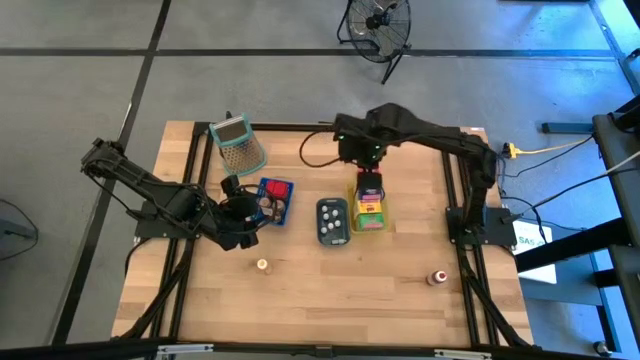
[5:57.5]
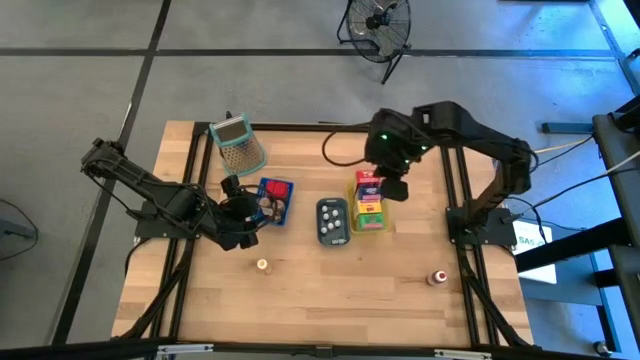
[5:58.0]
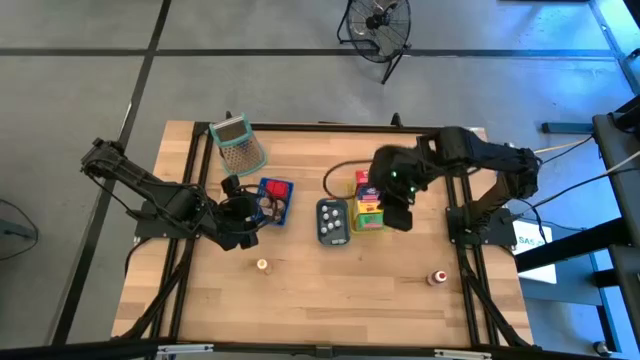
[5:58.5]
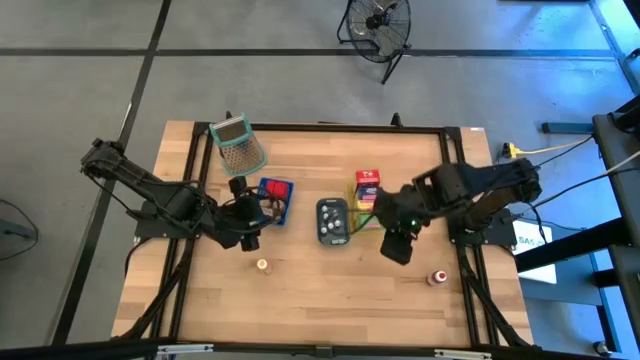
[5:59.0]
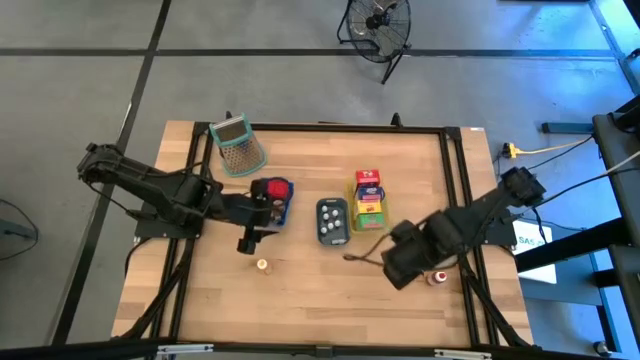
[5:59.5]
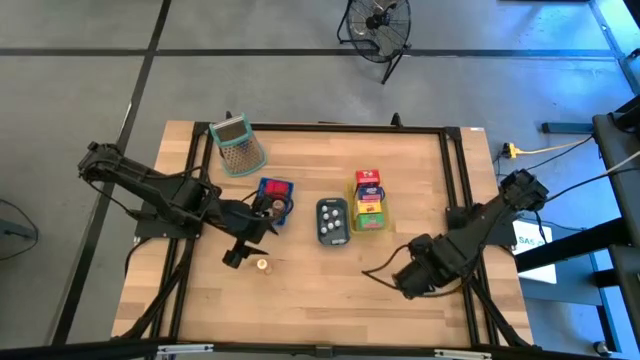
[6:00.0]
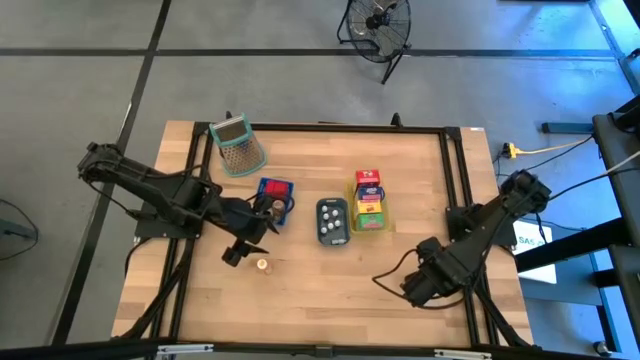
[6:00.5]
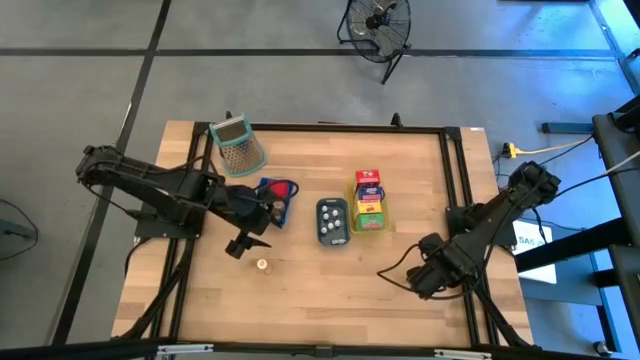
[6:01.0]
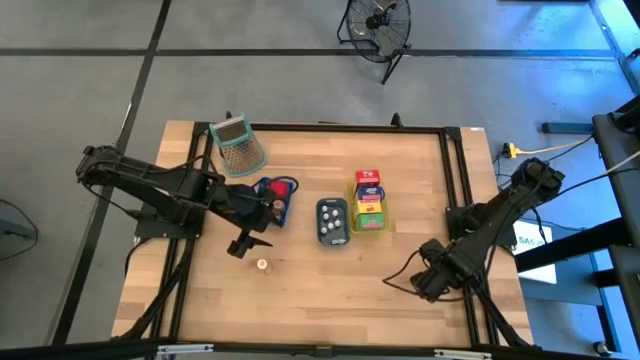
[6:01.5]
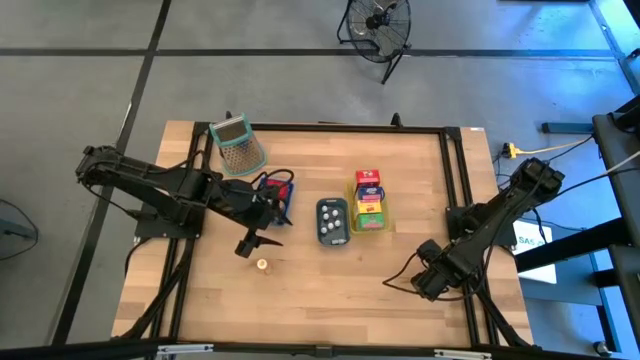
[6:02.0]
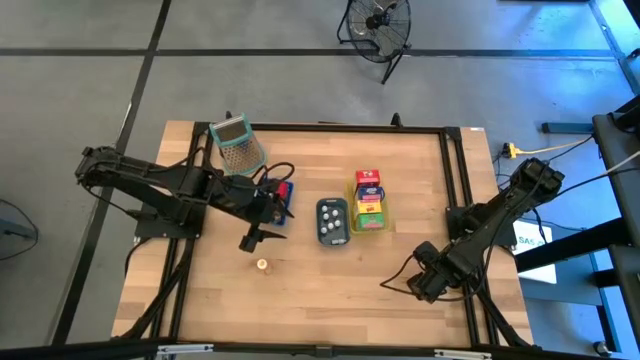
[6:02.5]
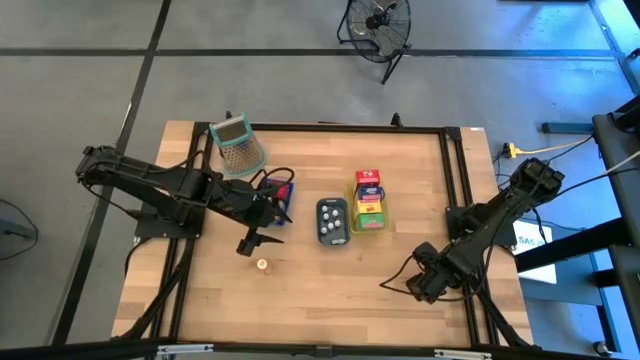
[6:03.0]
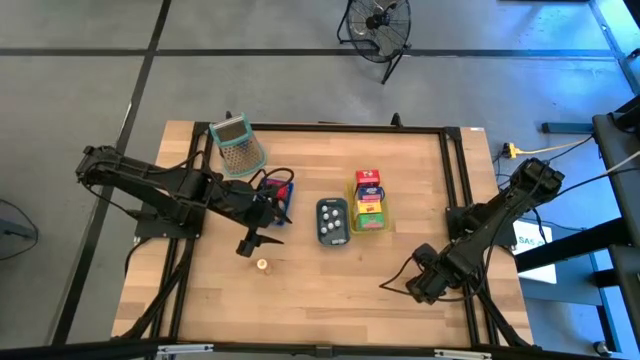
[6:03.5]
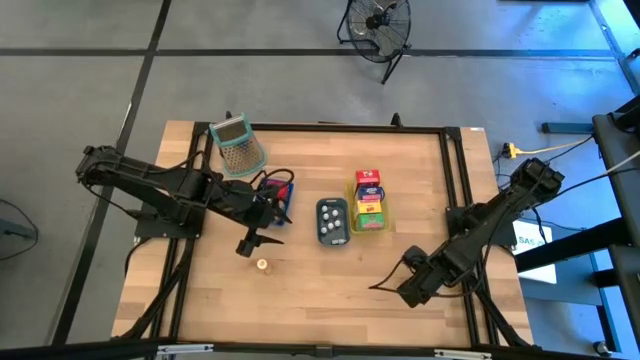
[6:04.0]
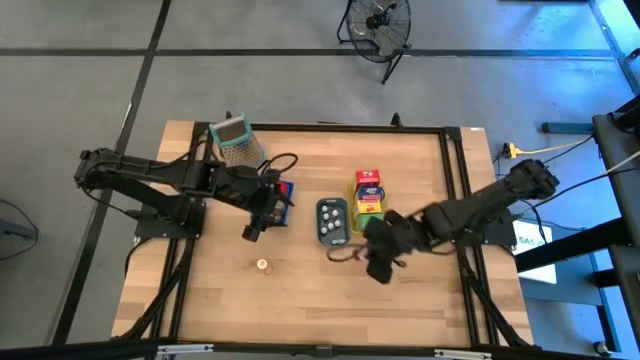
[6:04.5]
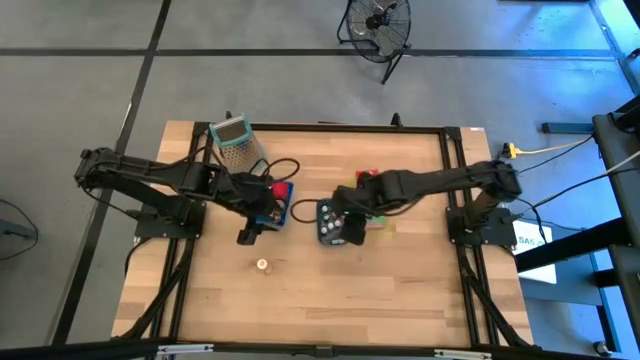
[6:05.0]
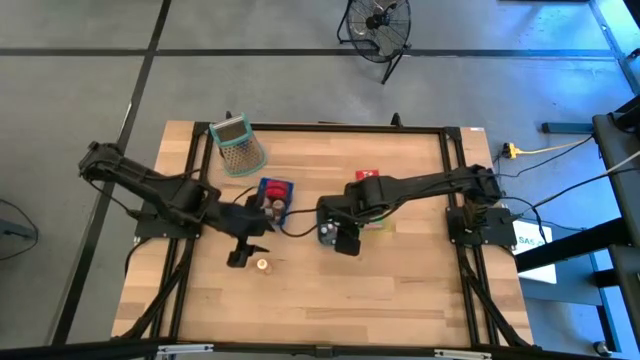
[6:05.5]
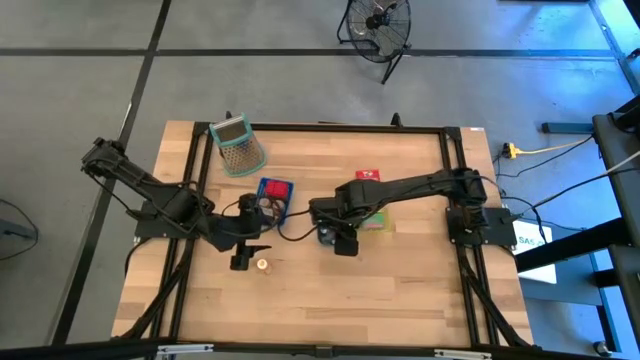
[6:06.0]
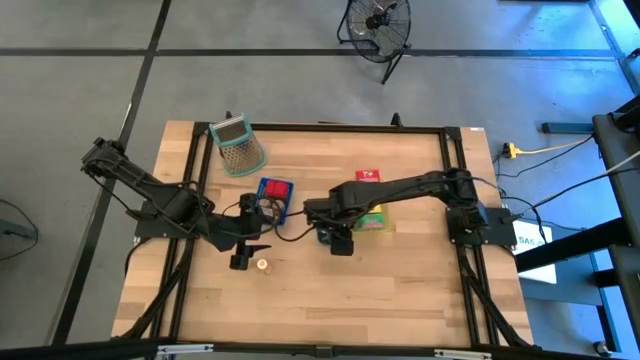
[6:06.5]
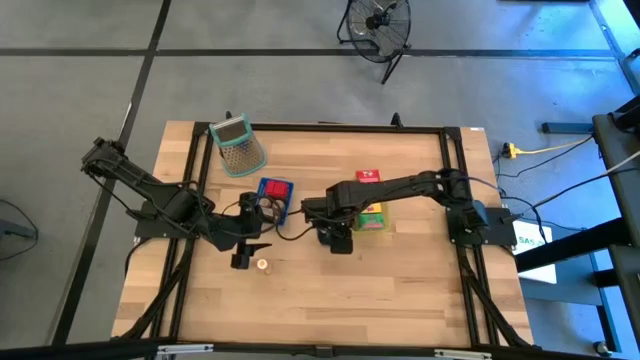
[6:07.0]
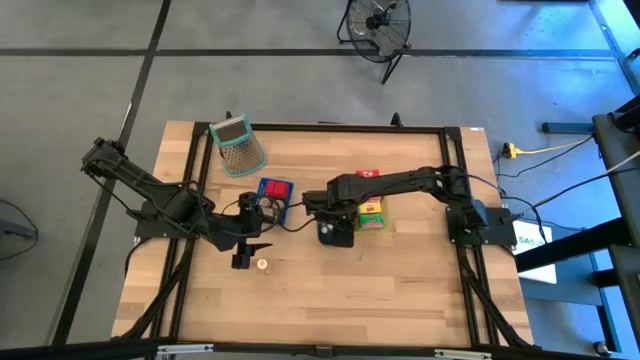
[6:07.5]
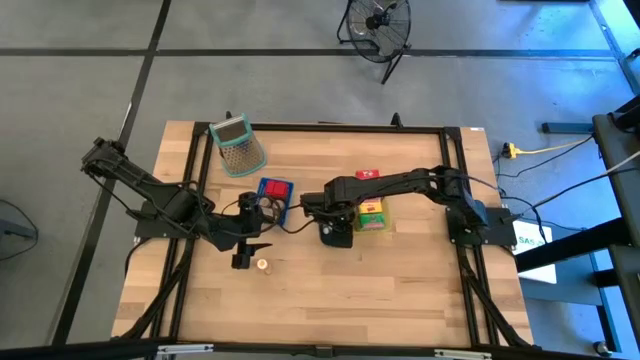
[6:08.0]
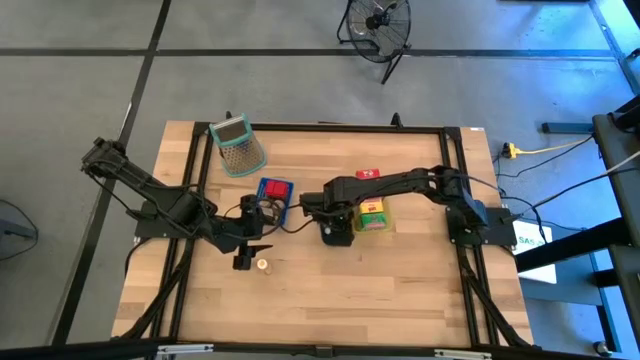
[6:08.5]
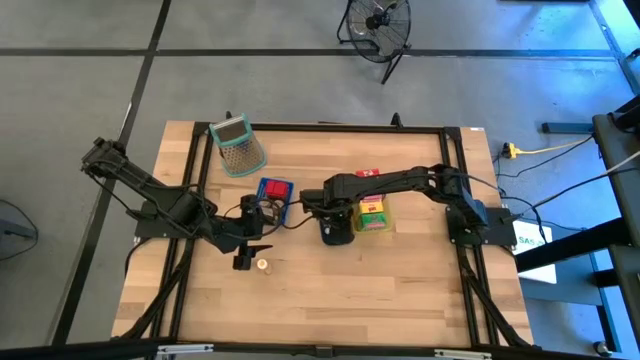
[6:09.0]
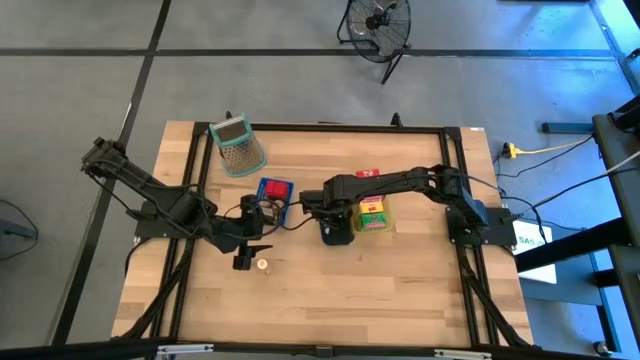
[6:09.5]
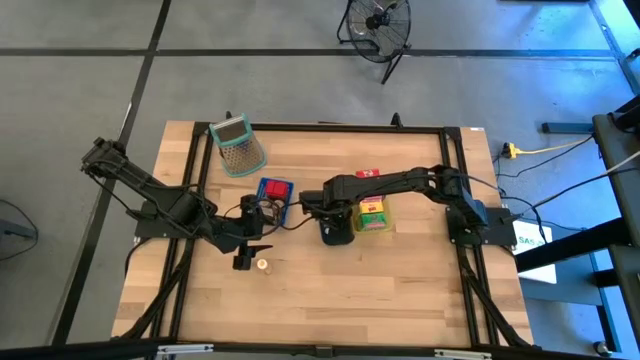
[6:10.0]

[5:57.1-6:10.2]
Task: Pick & Place Kitchen Items
Put the large red food coloring into the green bin

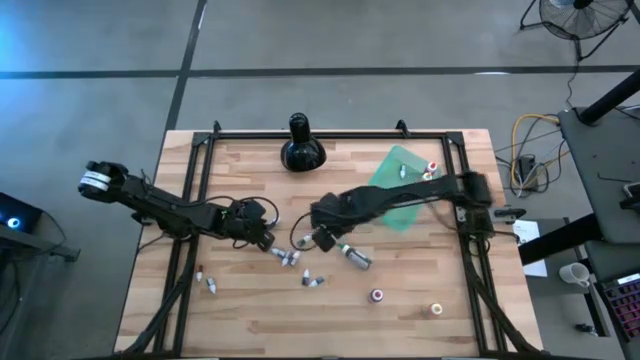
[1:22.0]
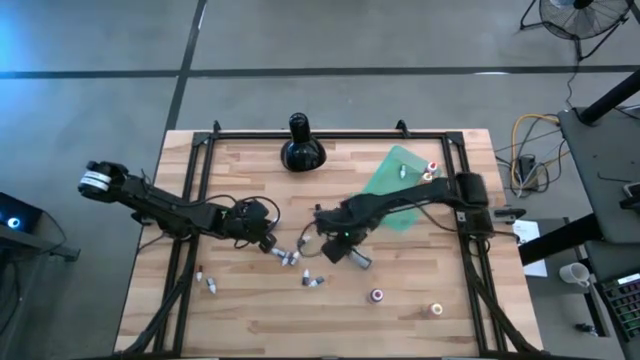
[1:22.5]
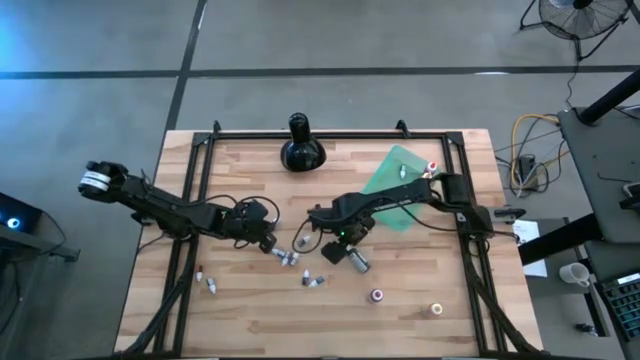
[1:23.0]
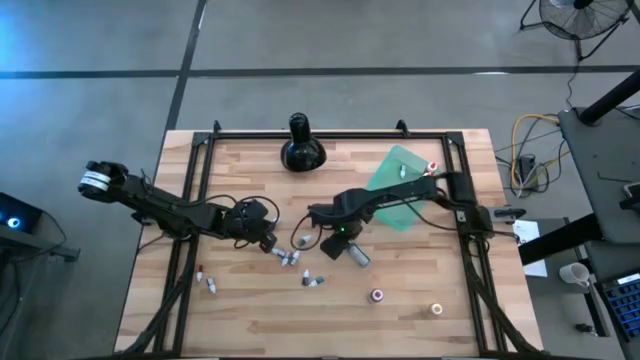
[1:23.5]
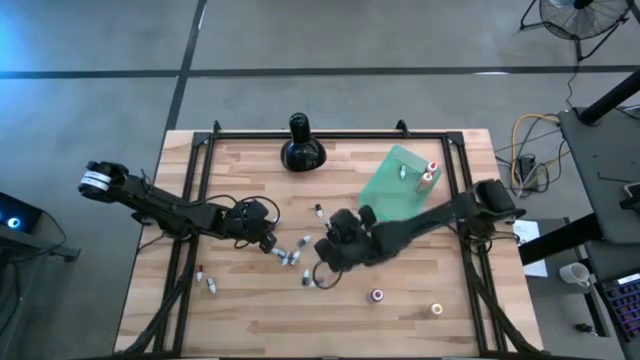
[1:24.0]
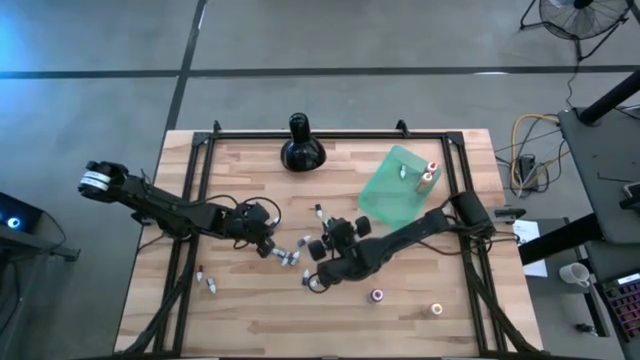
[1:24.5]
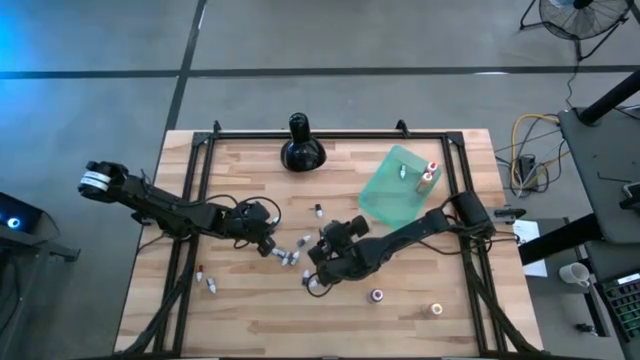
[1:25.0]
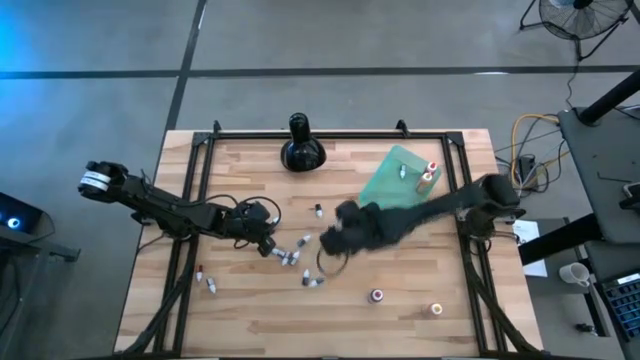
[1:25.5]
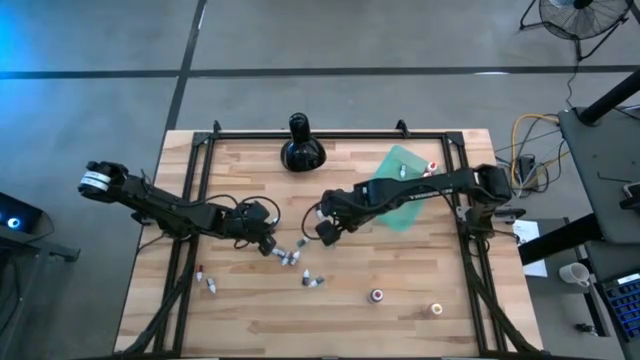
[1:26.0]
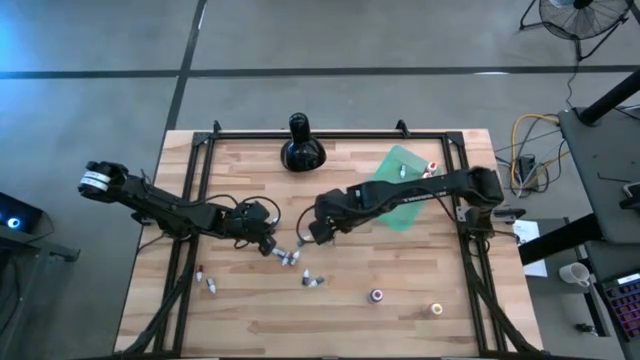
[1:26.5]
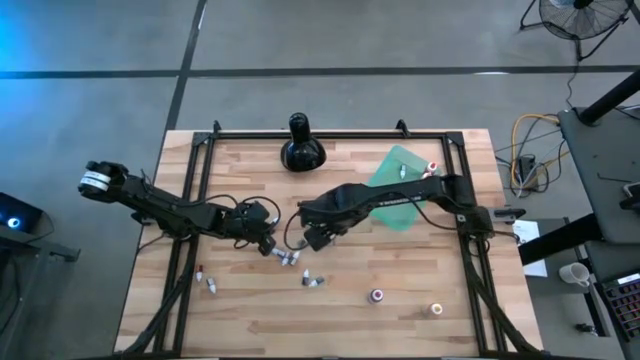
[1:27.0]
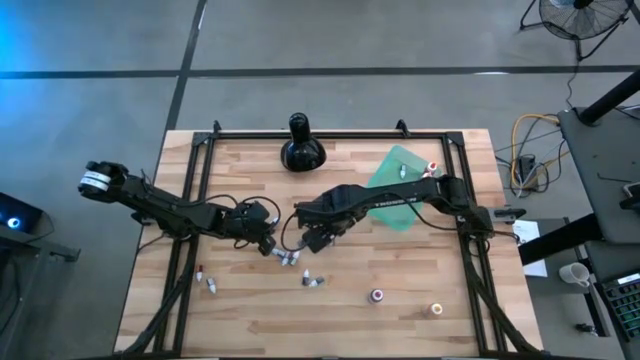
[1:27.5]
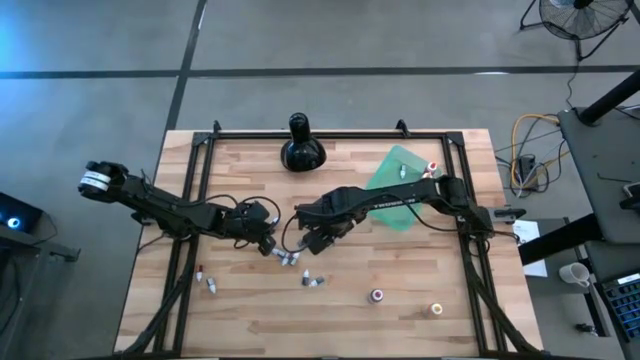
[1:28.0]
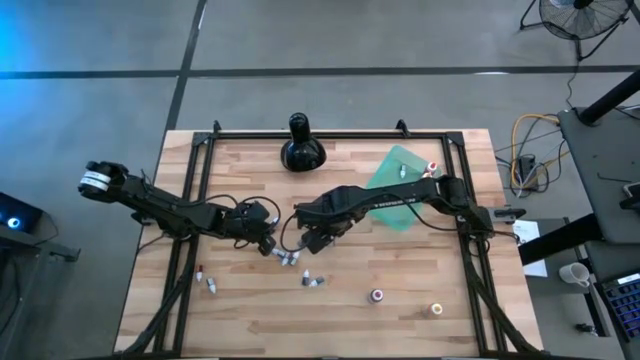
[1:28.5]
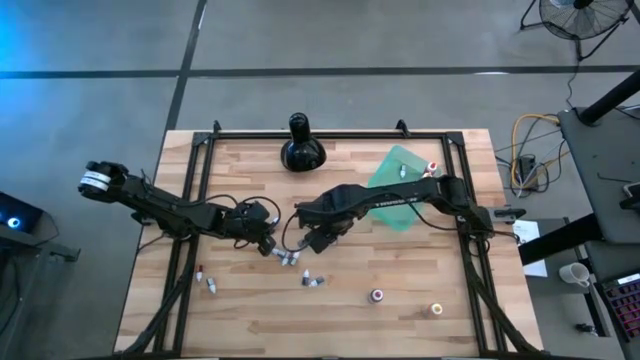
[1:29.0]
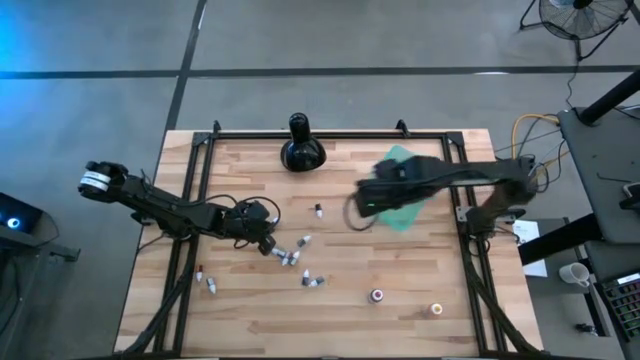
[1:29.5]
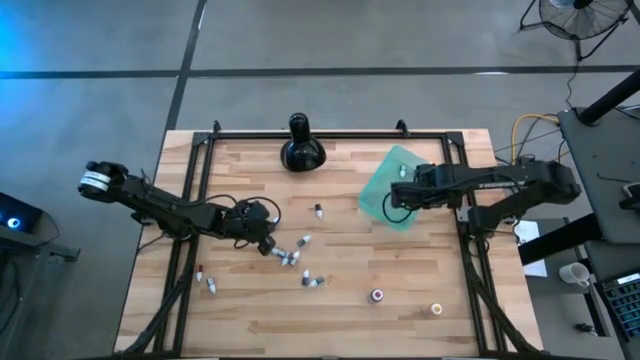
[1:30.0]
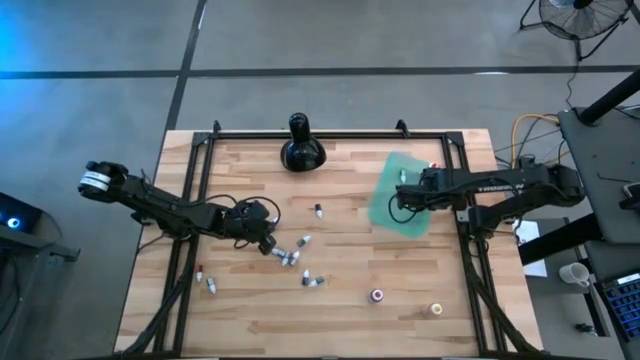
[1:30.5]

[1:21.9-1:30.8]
Task: Pick & Place food coloring
Put the large green food coloring bottle into the green bin

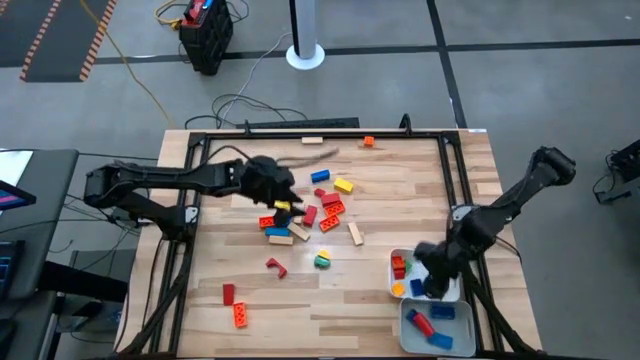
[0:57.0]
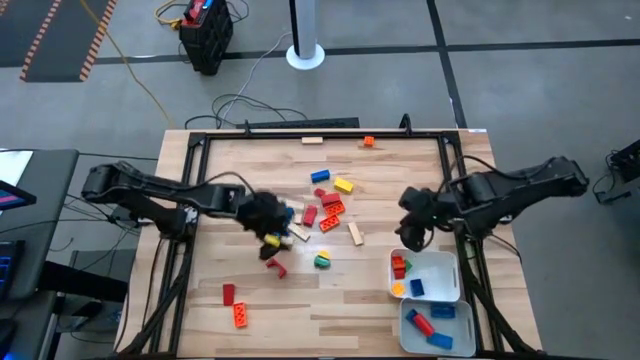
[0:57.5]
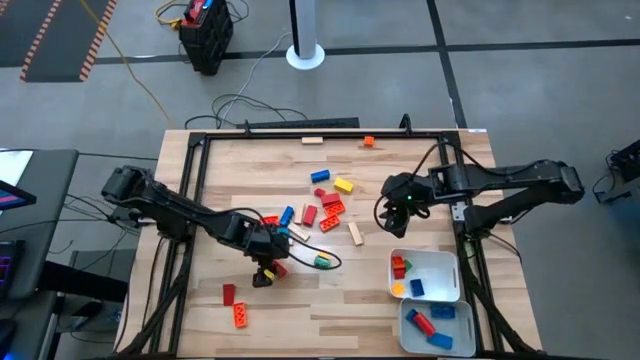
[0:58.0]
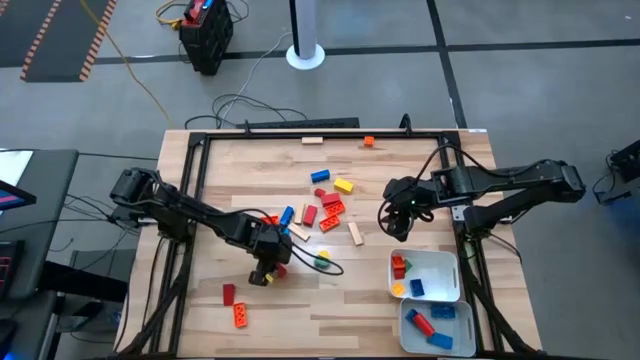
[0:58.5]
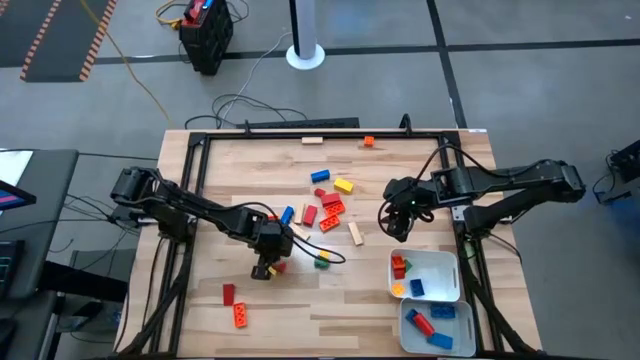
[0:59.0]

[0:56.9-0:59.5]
Task: Sort blocks by size
Put the big red block into the gray bin
